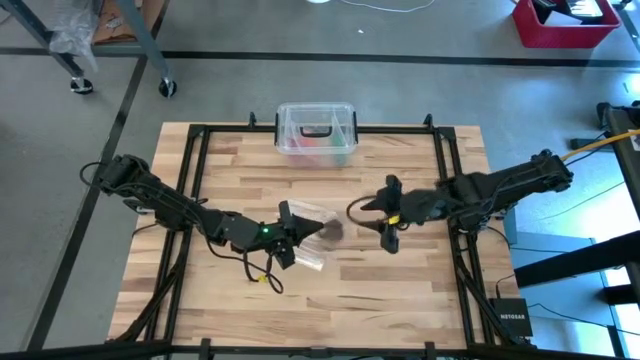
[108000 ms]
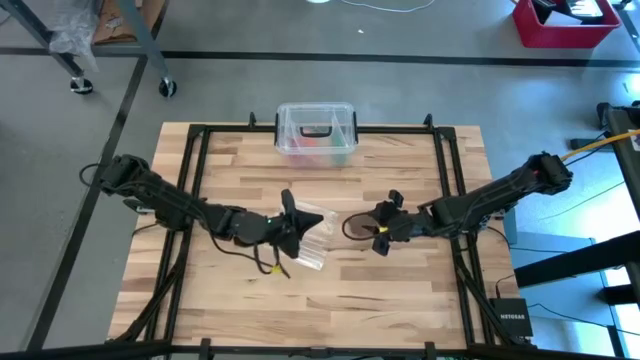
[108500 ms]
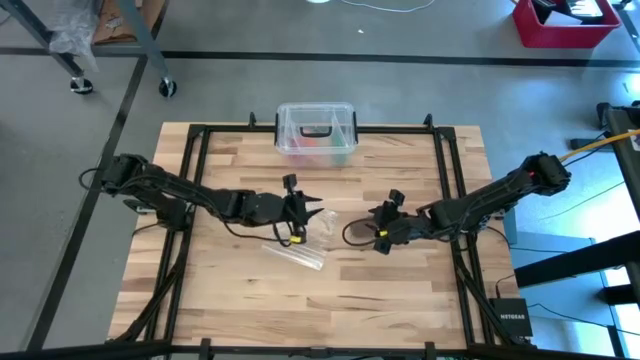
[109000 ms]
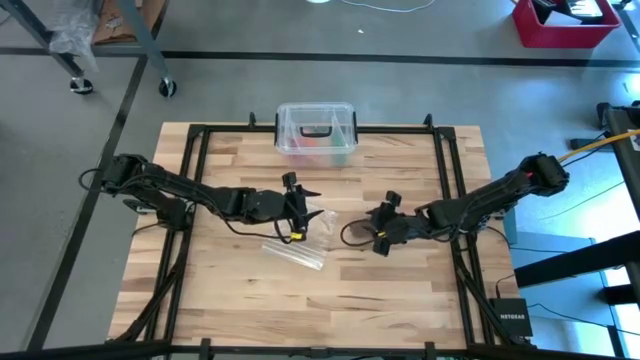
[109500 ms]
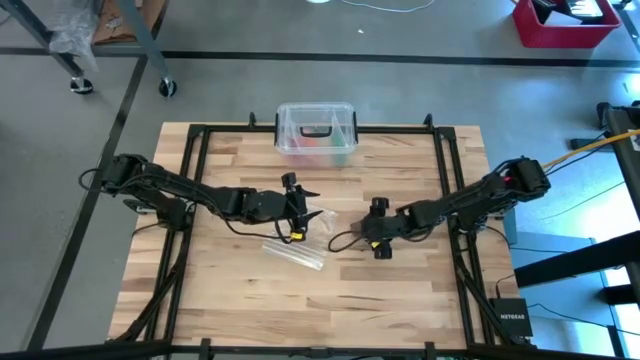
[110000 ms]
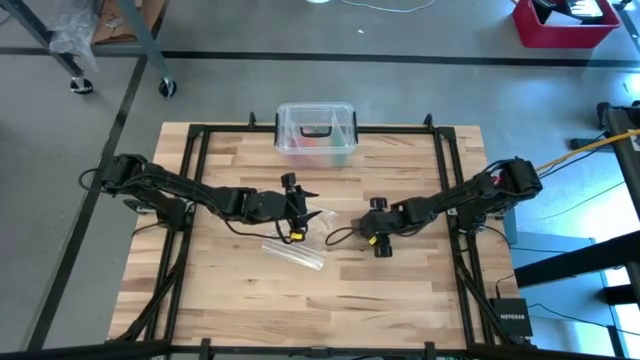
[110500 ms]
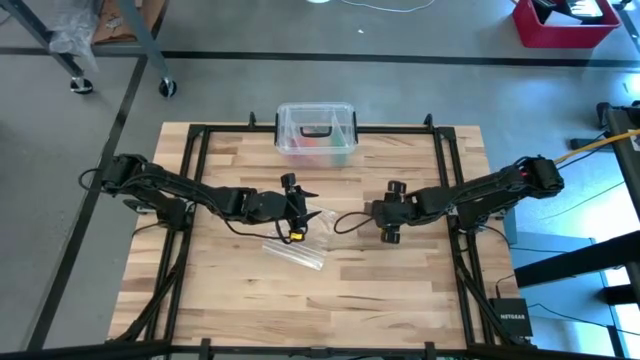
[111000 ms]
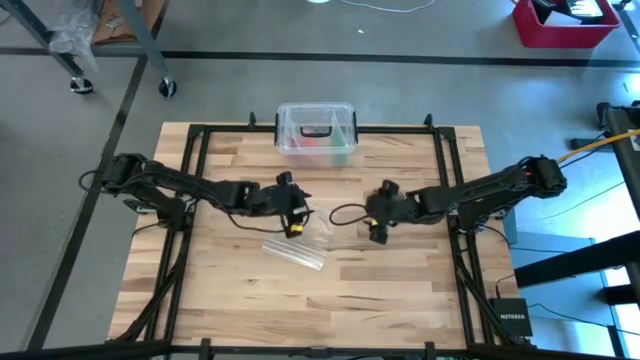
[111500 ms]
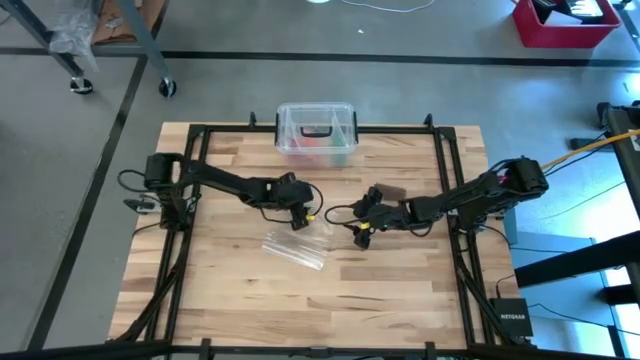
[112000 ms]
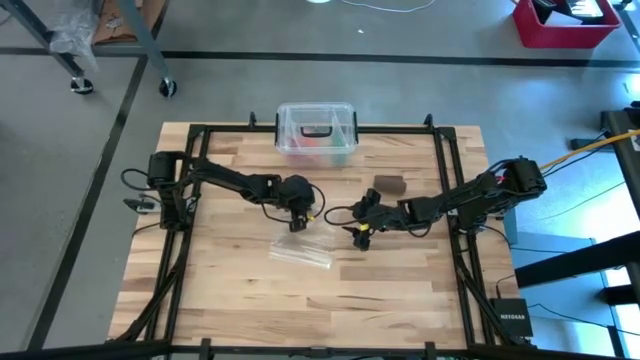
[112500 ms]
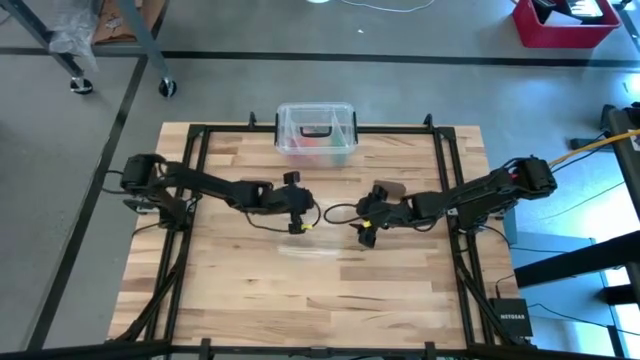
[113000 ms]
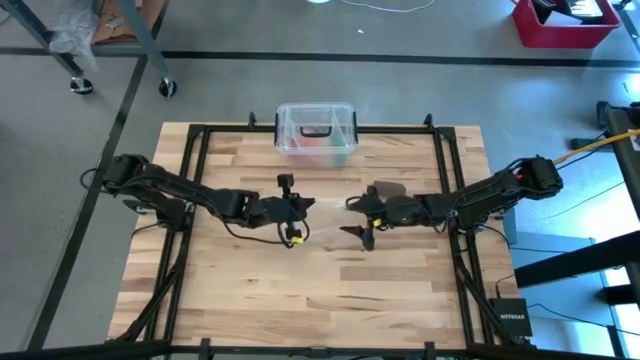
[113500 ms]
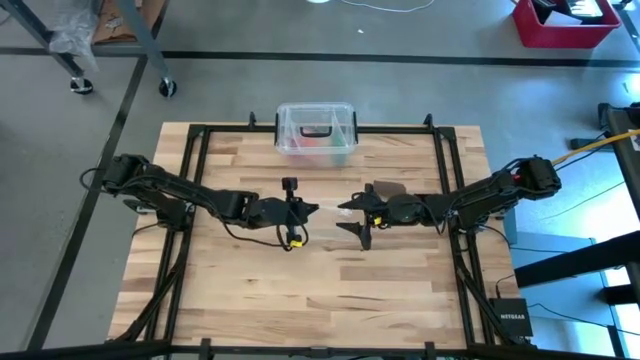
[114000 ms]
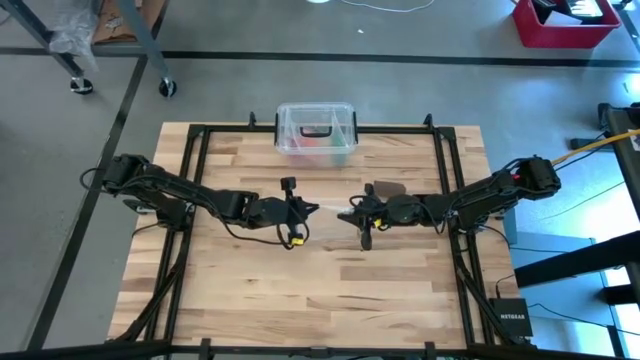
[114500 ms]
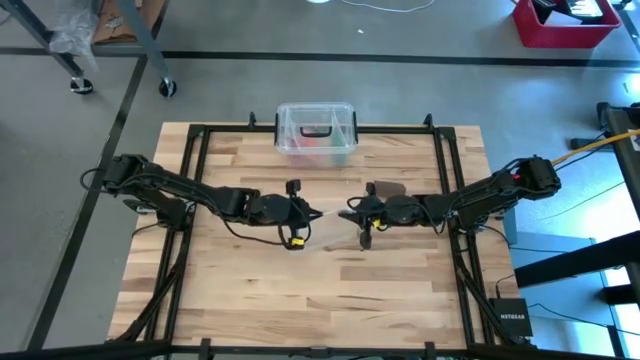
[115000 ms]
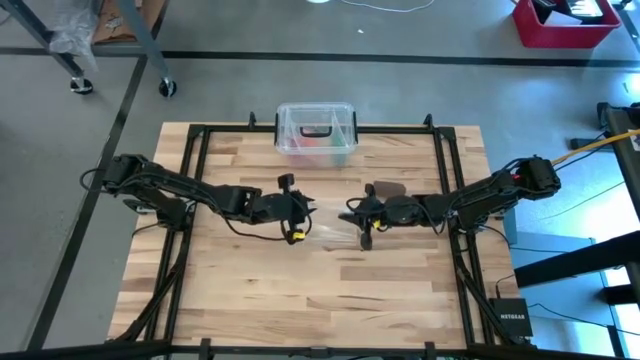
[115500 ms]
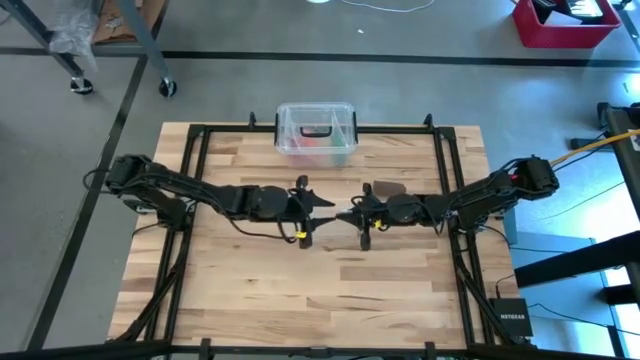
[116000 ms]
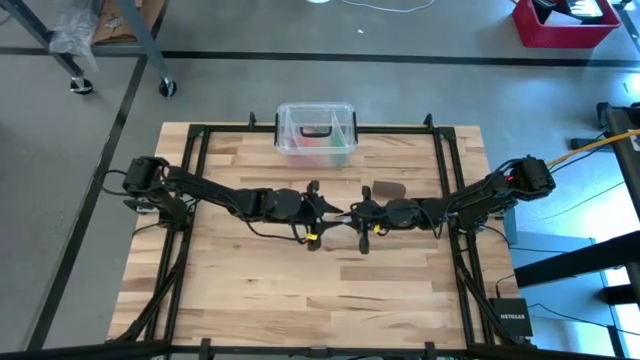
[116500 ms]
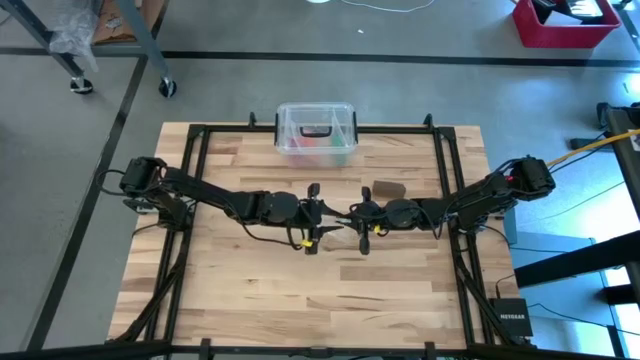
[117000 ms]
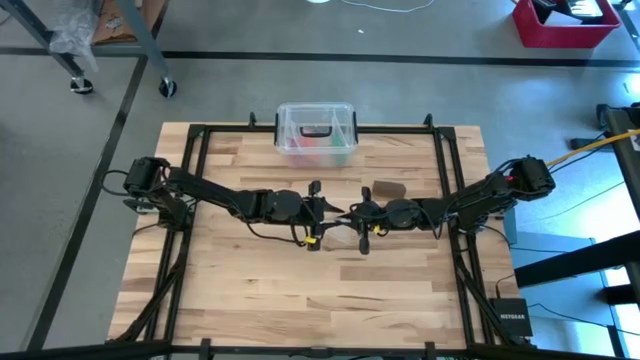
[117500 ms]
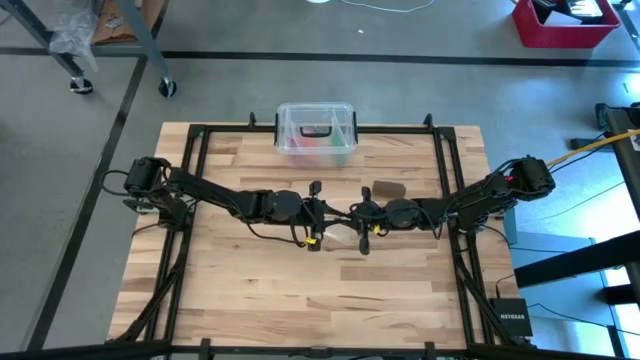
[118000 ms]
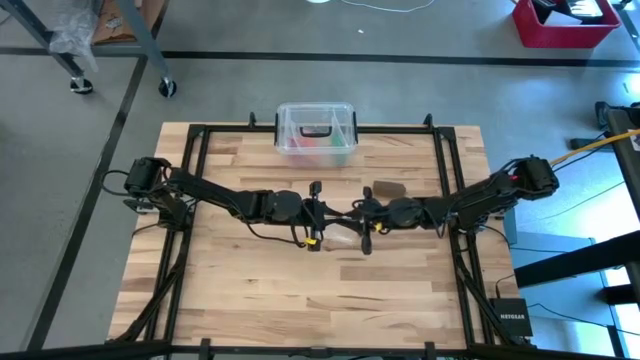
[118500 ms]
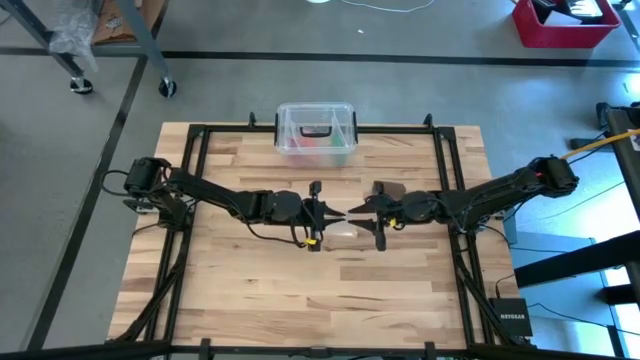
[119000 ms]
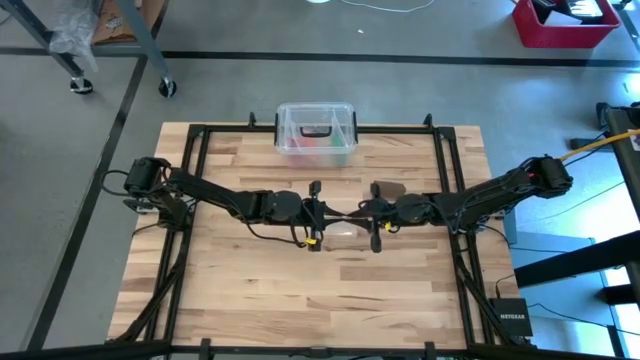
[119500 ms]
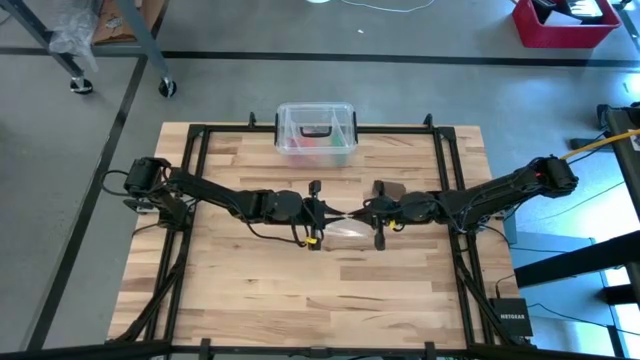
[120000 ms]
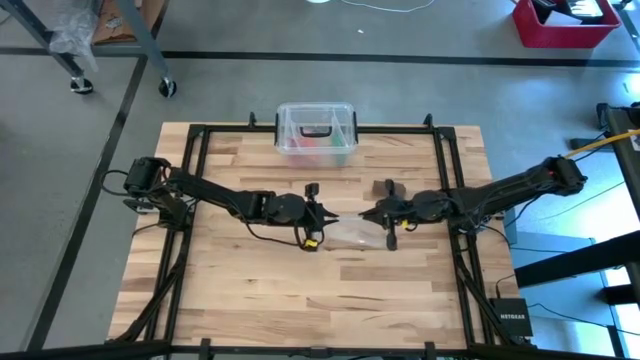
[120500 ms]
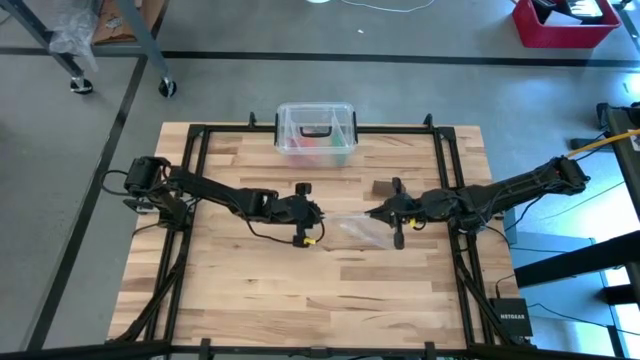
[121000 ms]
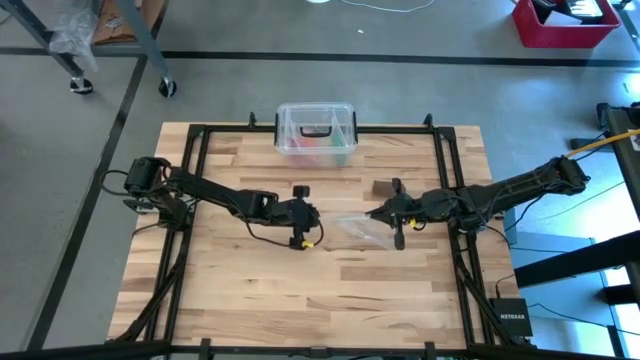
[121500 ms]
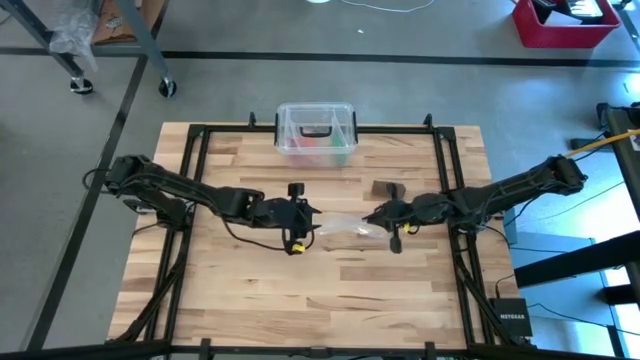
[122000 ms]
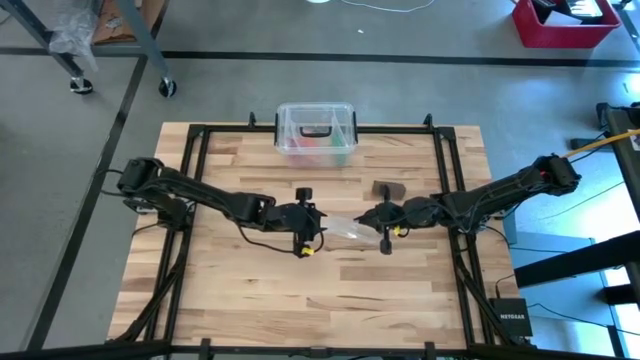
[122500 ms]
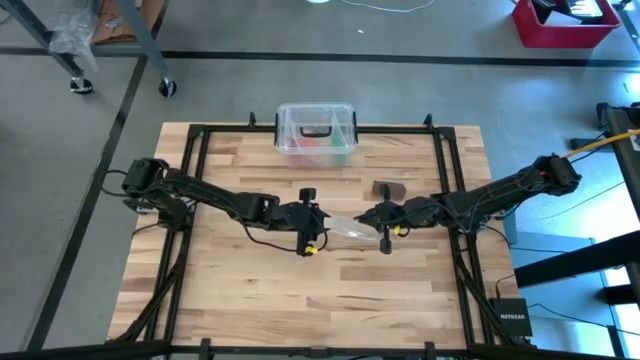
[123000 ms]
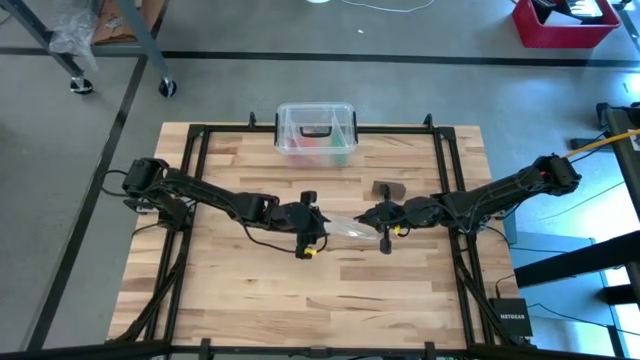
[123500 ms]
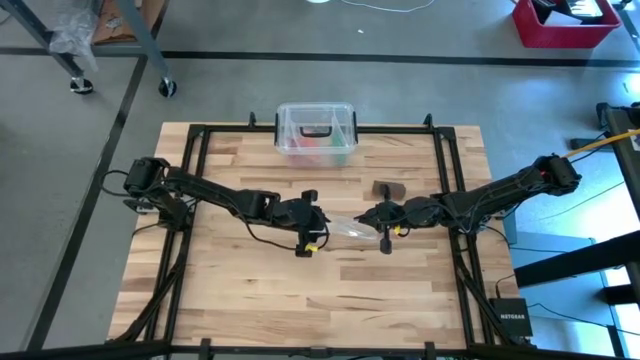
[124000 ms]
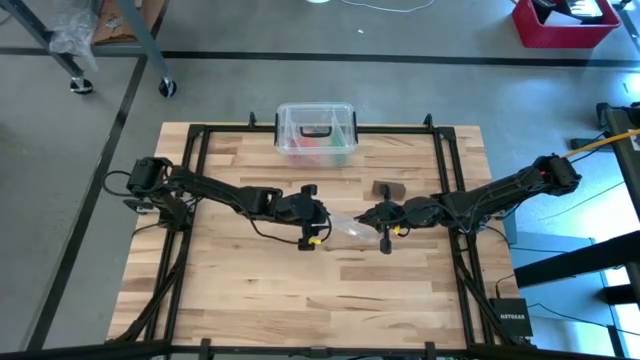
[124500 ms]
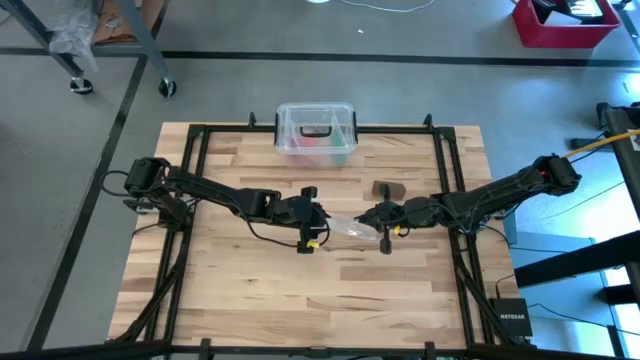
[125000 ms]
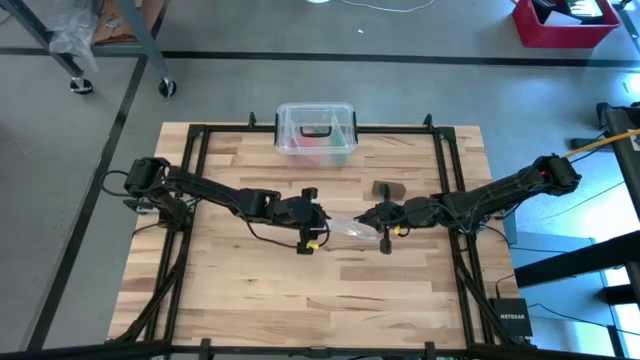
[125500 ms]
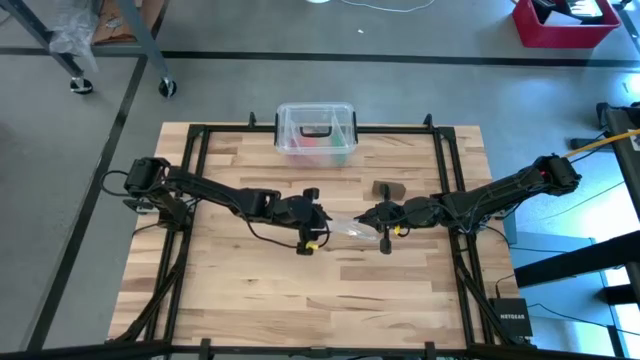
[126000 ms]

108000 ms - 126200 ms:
Task: Roll bandage
Open the transparent zip bag

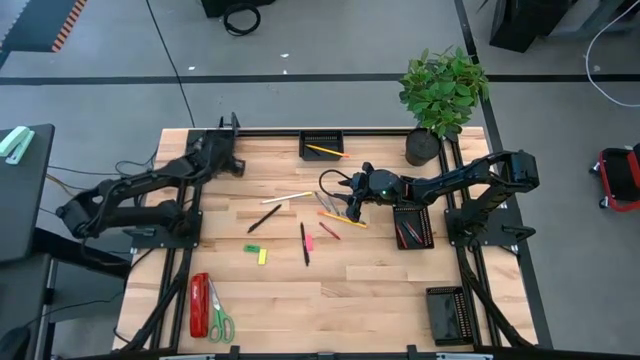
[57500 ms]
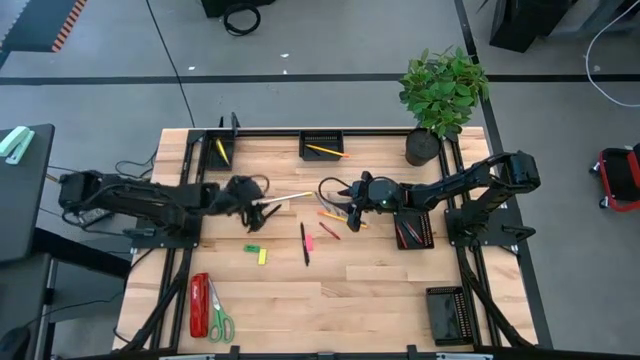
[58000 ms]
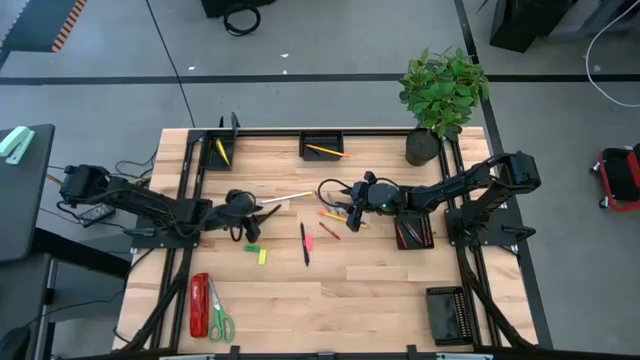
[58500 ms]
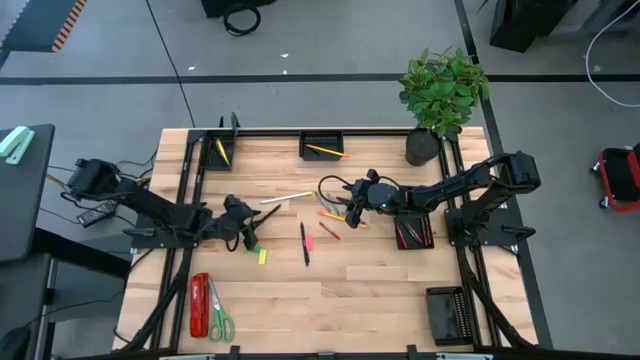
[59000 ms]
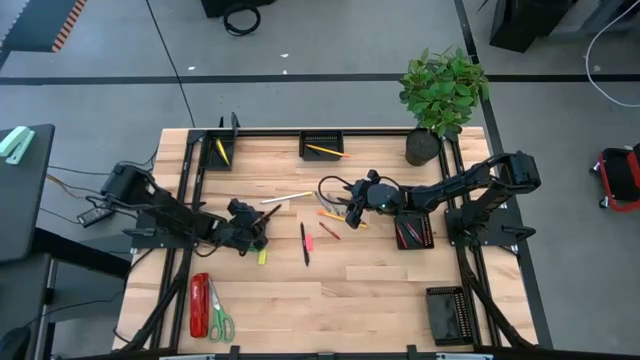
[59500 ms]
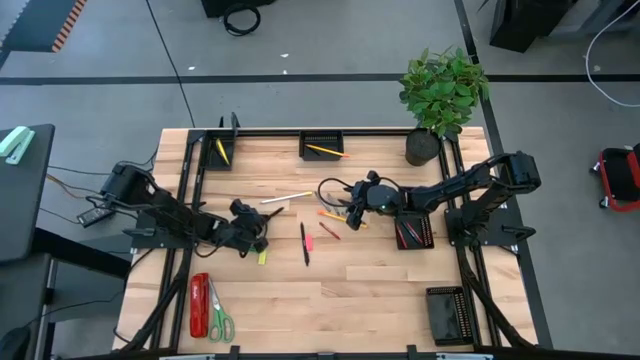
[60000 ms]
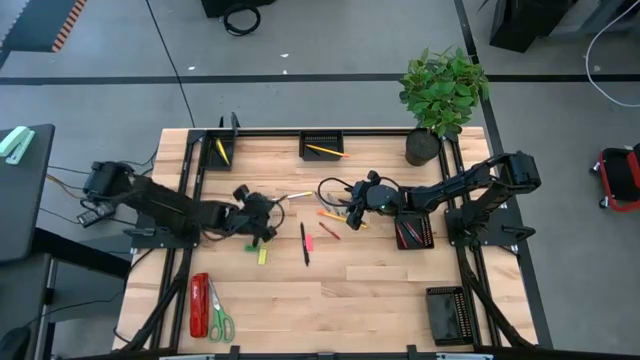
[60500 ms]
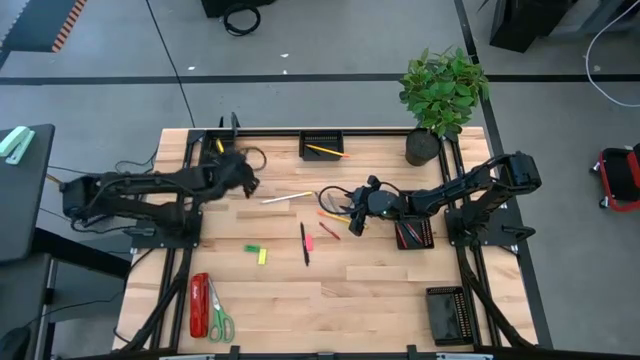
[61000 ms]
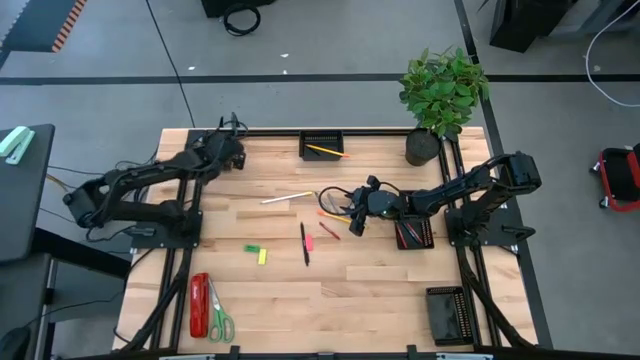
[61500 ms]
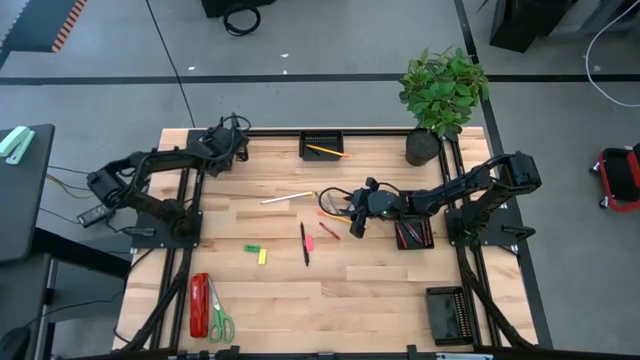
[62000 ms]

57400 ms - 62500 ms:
Task: Sort crayons/erasers/pens/pencils in bins
Put the black pen into the top left black bin
